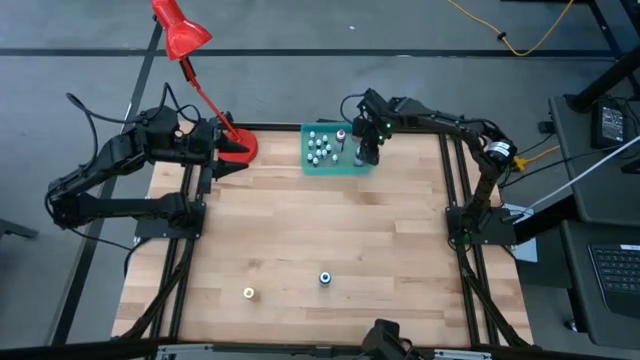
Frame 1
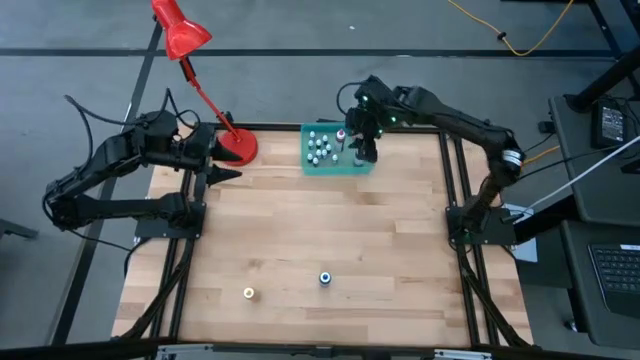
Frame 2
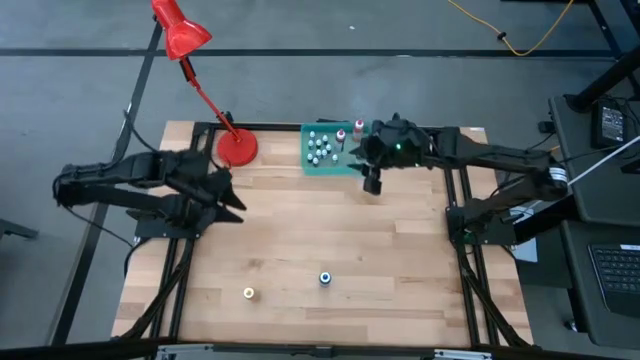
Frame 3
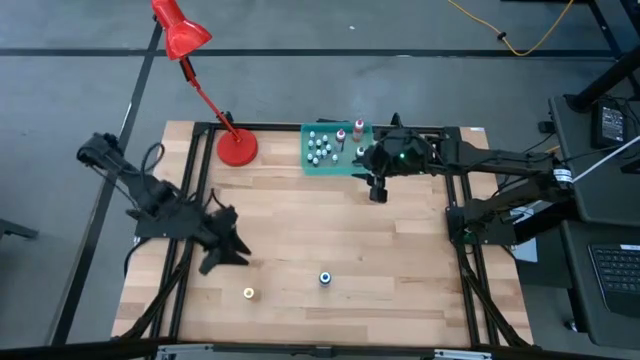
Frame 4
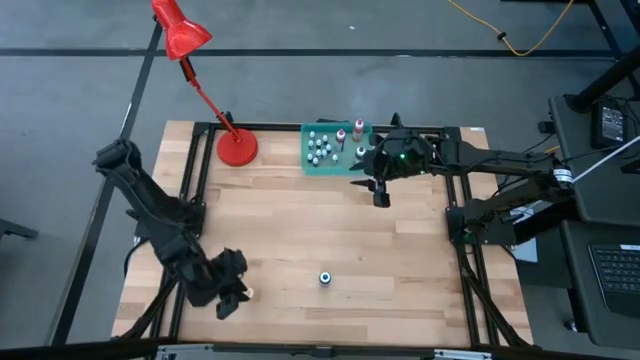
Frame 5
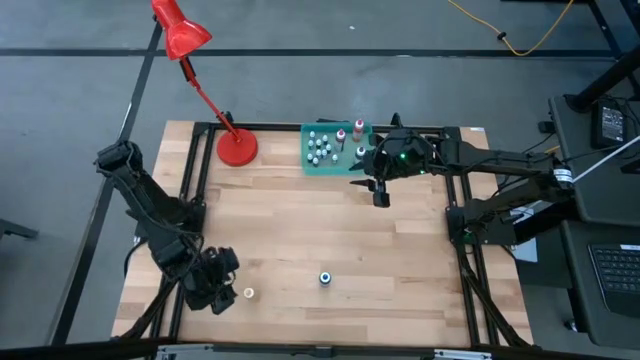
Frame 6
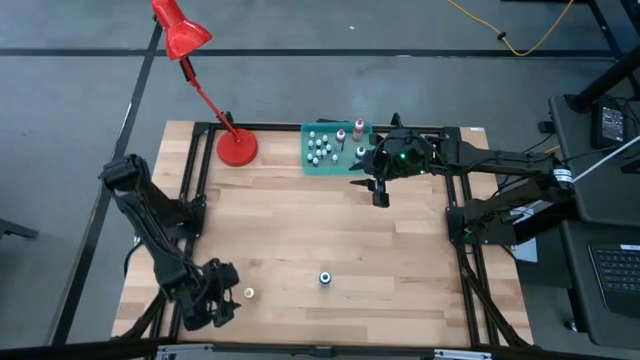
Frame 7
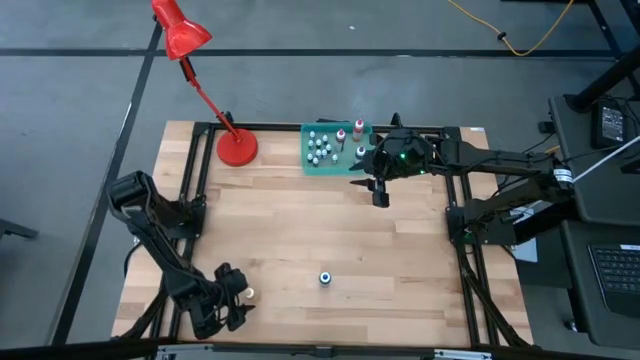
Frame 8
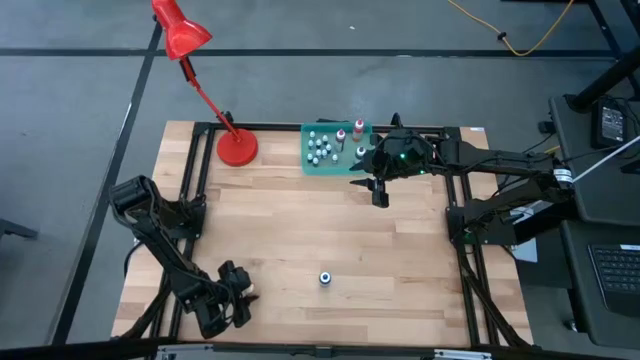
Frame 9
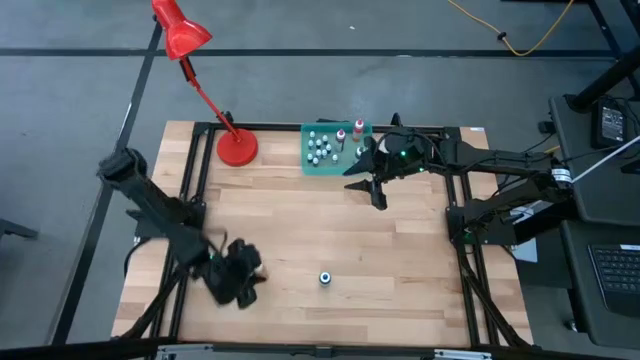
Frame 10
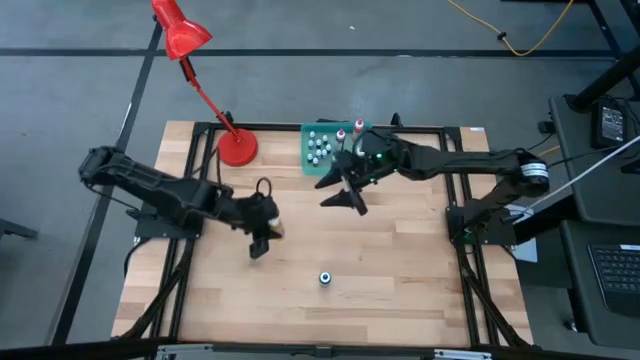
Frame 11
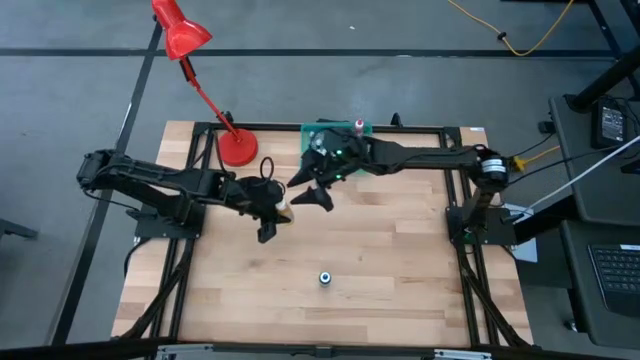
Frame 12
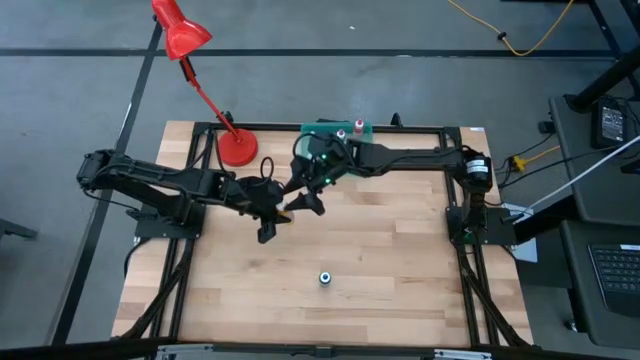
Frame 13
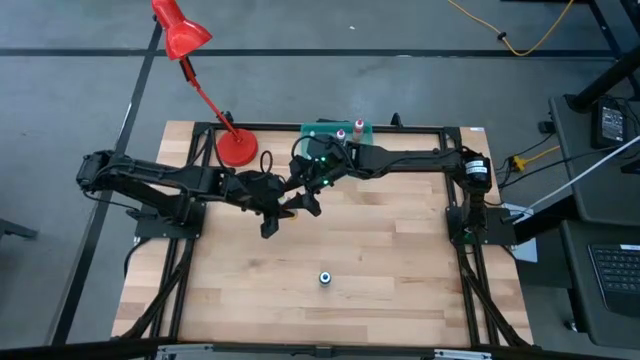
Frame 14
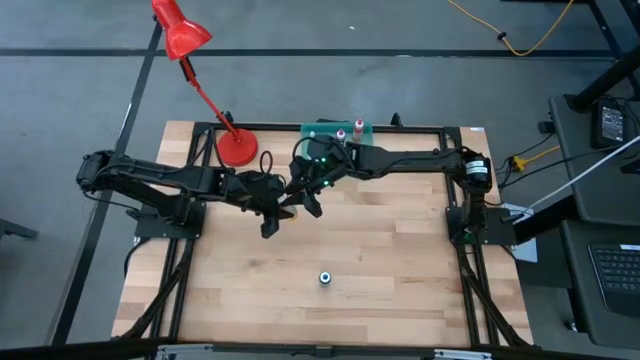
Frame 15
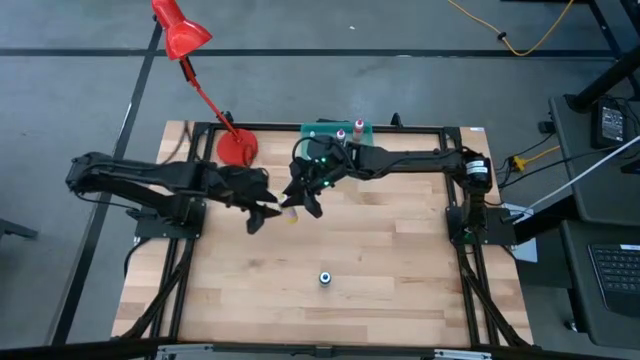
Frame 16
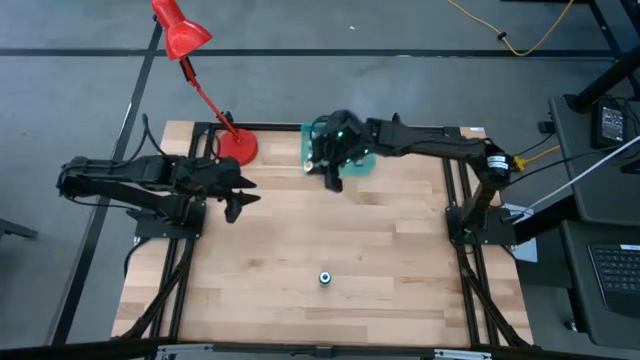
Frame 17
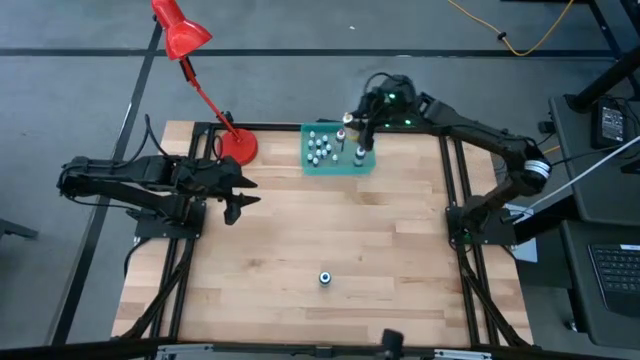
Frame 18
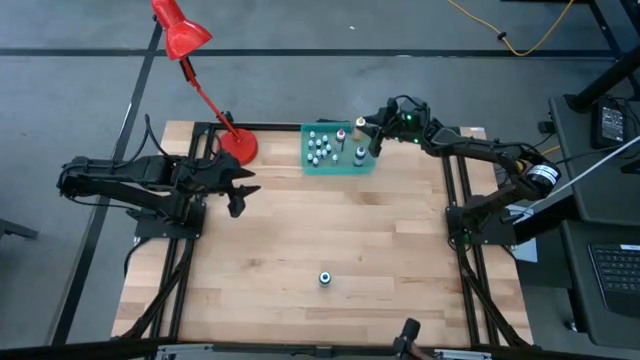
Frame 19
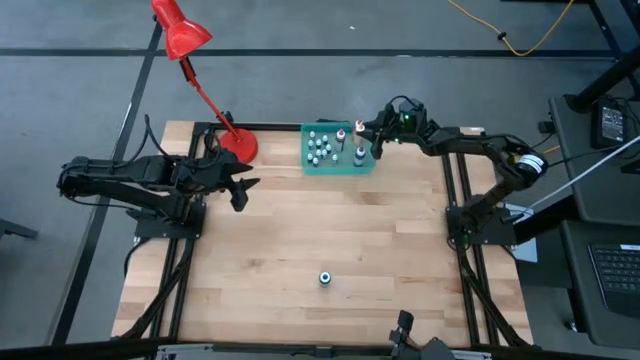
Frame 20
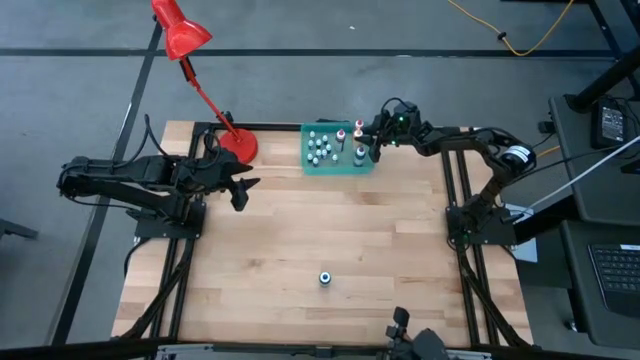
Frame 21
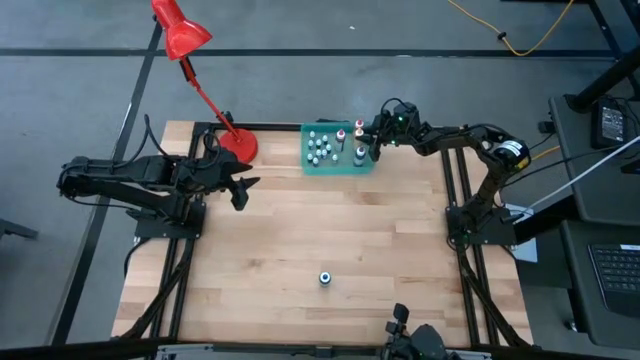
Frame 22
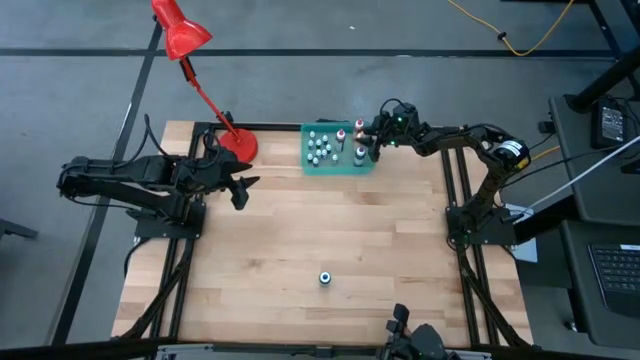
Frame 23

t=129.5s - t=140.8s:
Task: Pick & Place food coloring
Put the large yellow food coloring bottle into the green bin

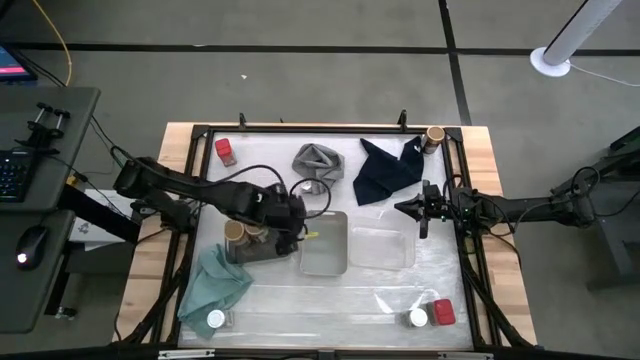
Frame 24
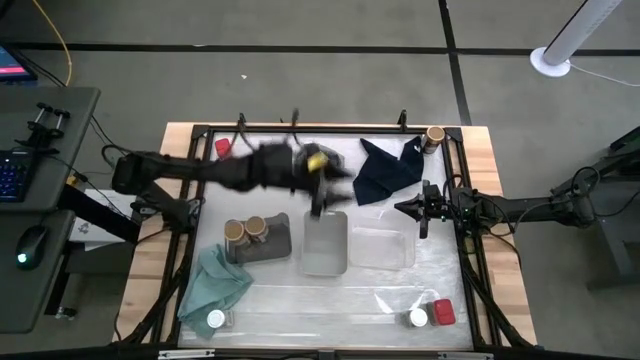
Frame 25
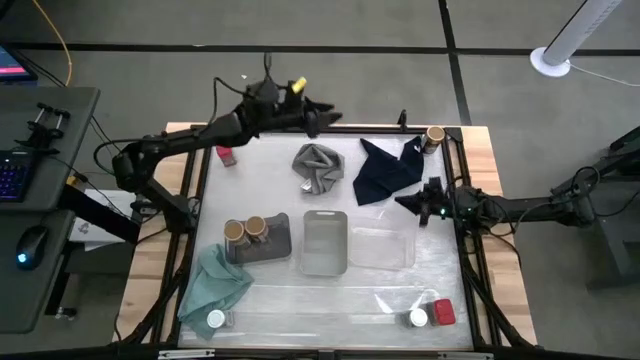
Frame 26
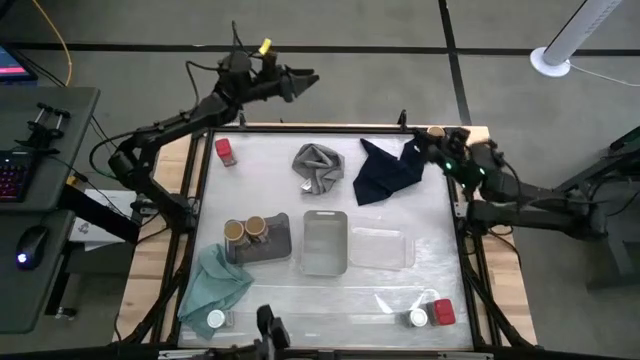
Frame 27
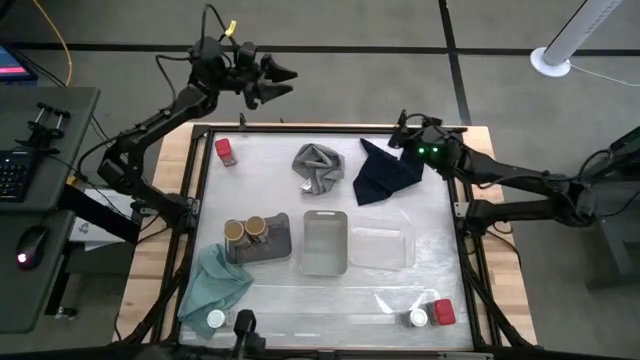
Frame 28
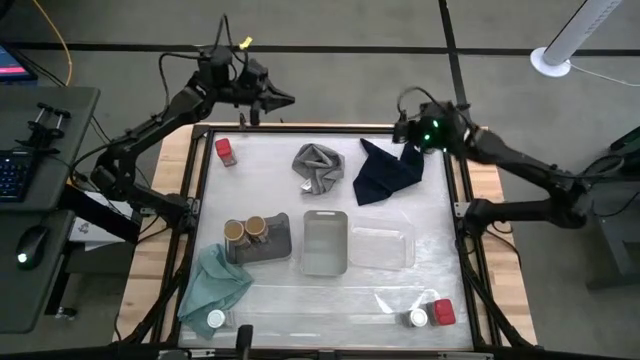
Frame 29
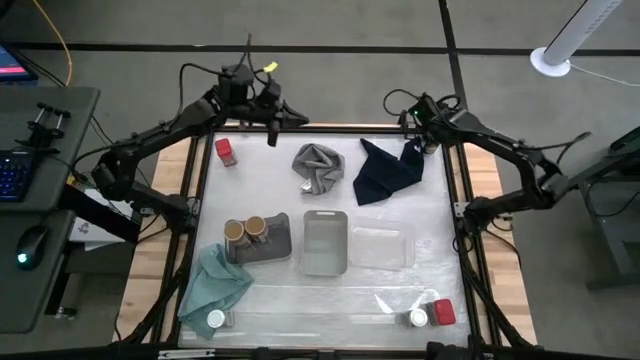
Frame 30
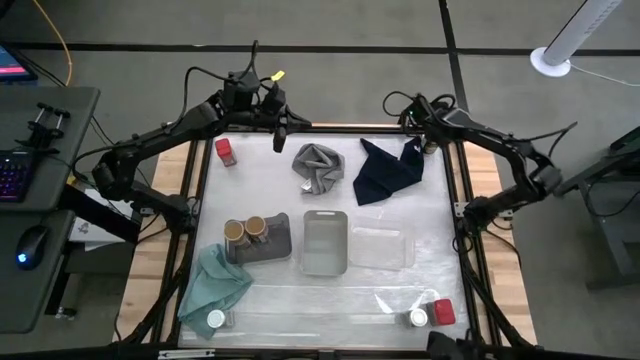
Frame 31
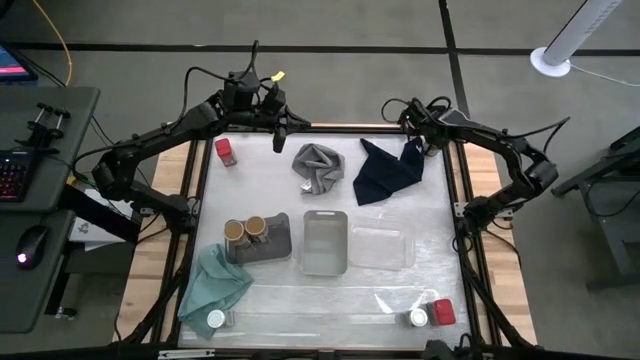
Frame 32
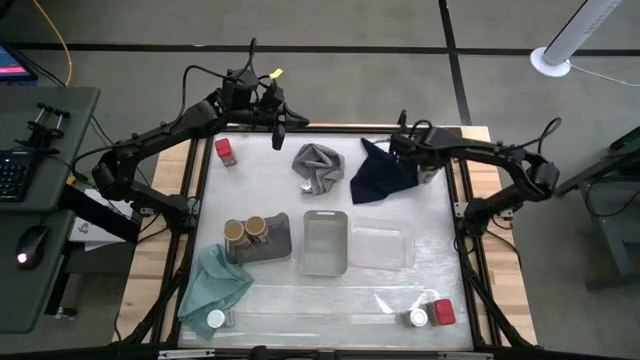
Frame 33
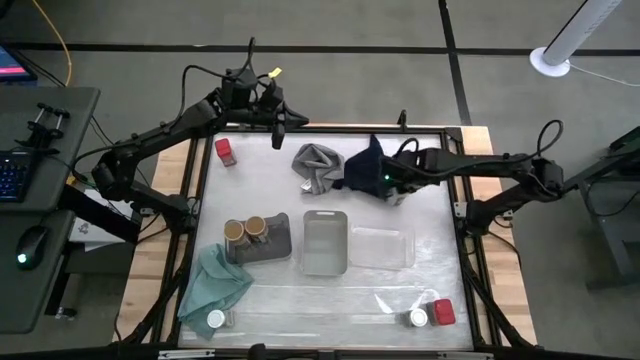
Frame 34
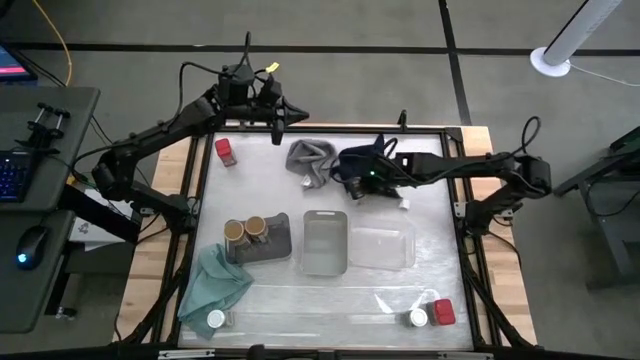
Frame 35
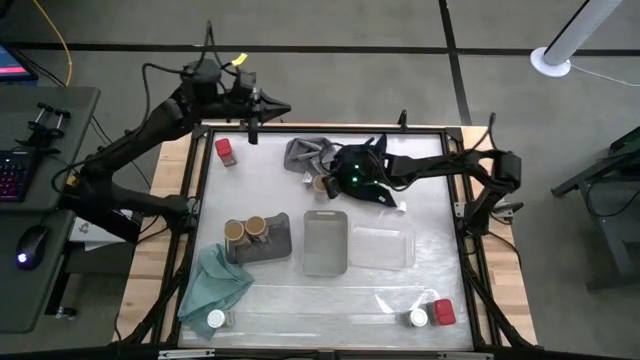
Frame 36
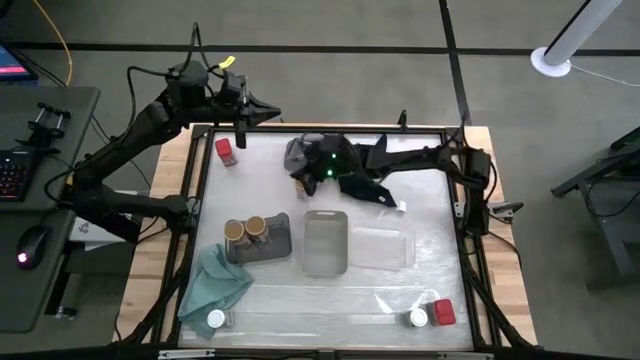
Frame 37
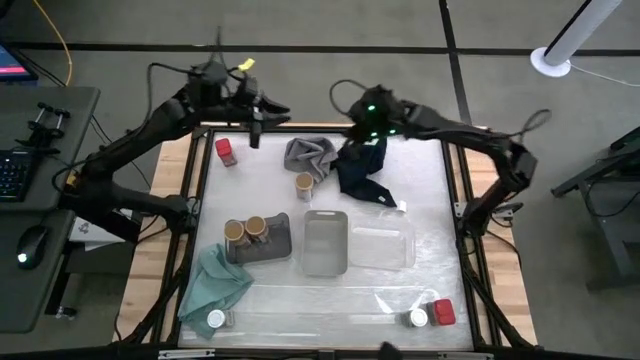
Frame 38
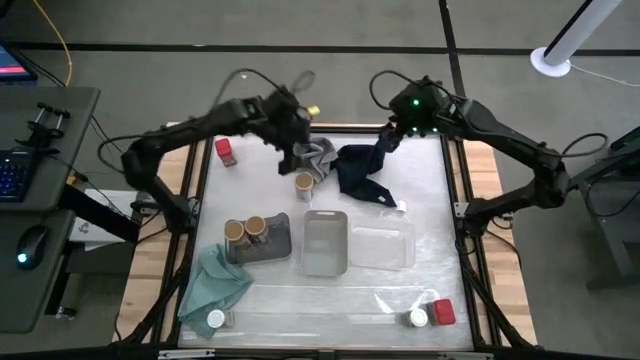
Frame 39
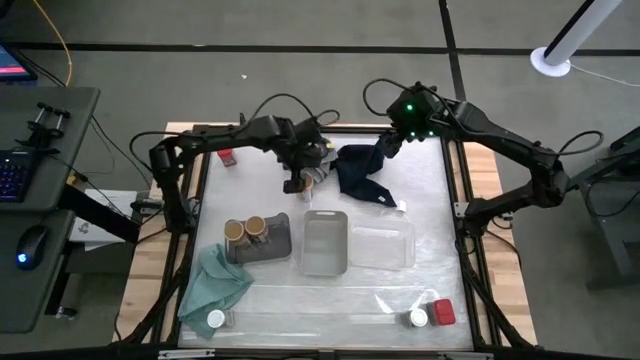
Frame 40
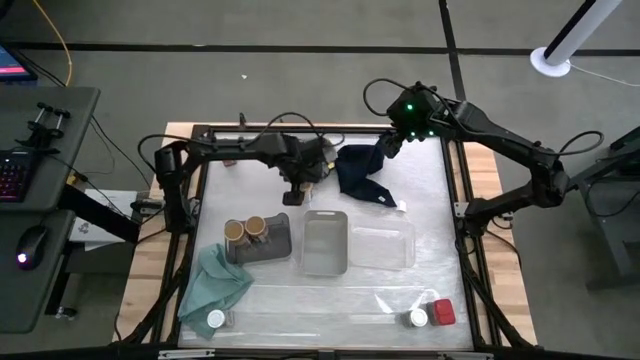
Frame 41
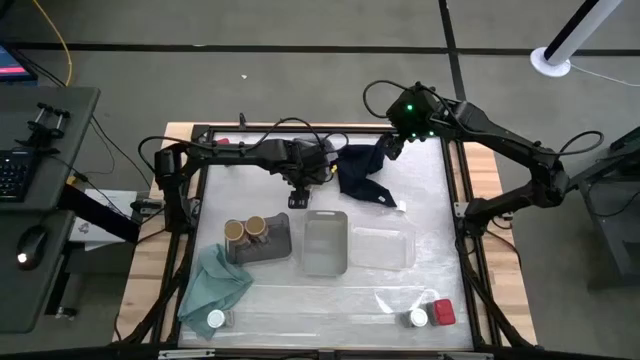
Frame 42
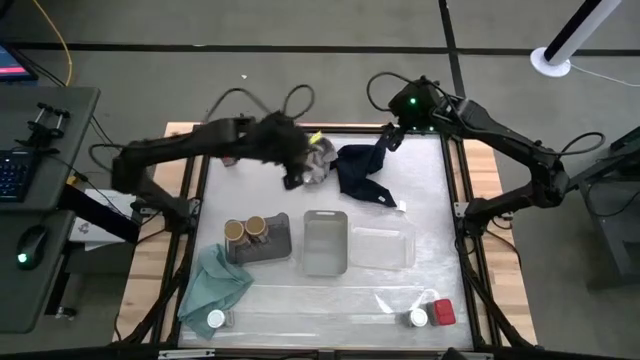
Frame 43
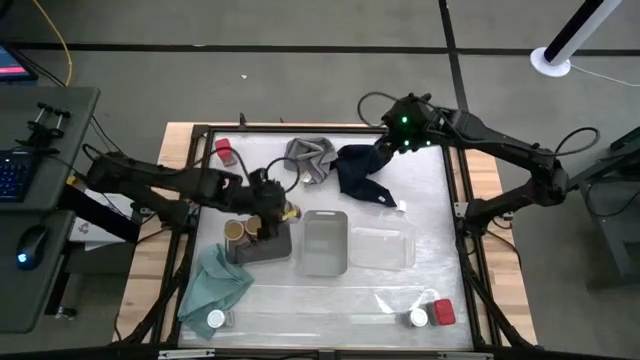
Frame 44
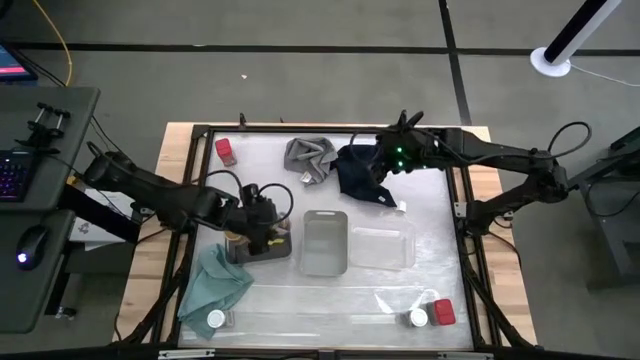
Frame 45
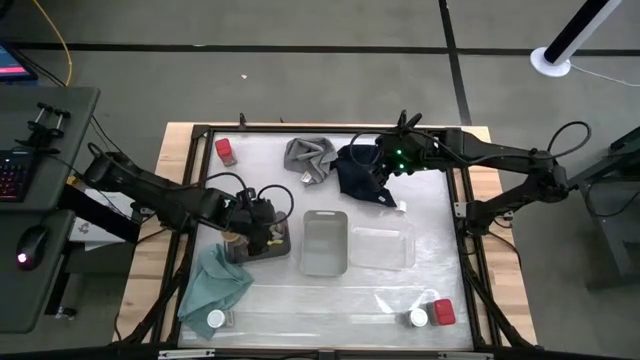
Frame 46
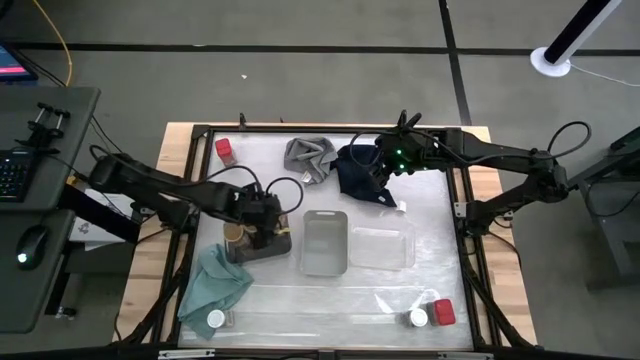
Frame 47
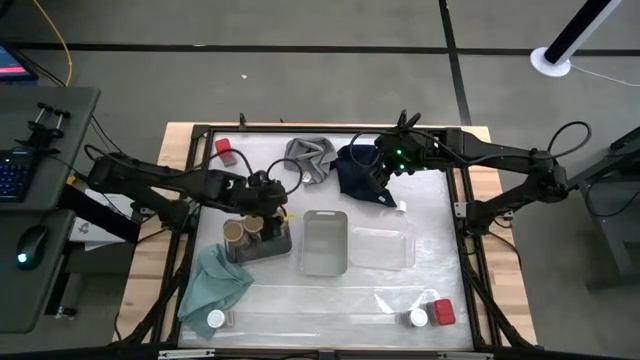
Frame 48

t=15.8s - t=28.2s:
Task: Sort spices by type
Put the gold seasoning bottle into the black bin
